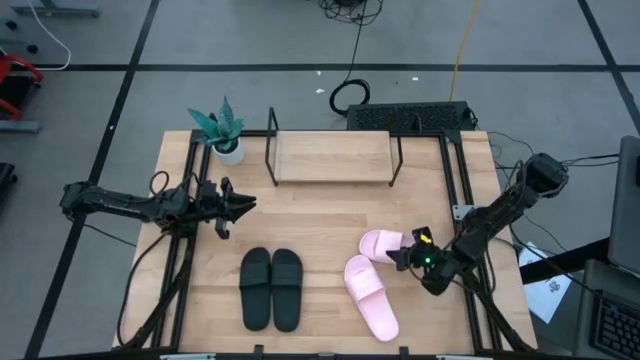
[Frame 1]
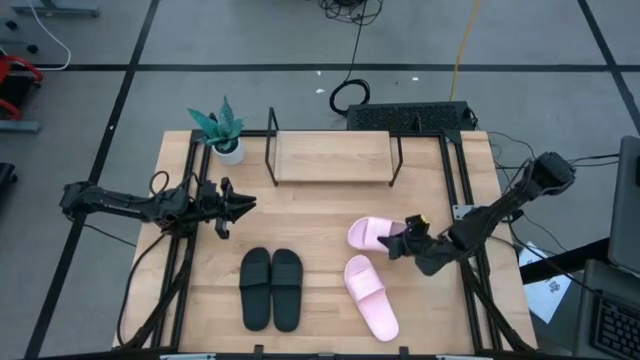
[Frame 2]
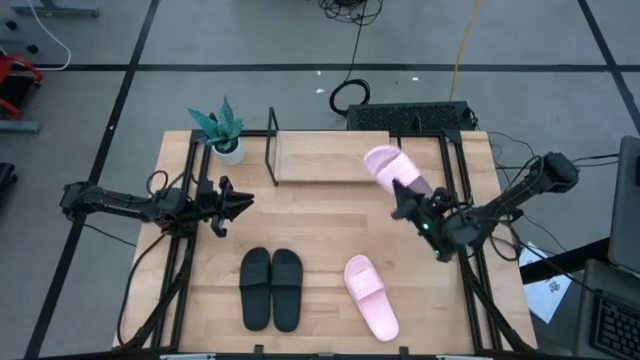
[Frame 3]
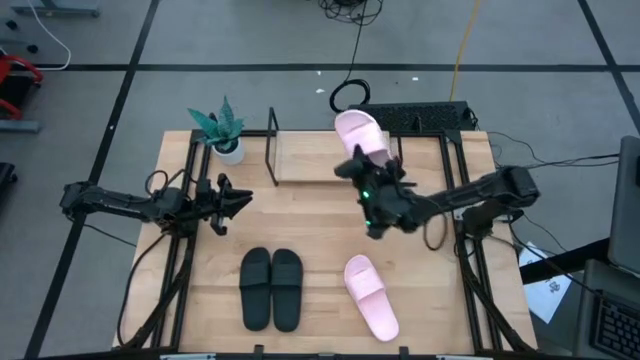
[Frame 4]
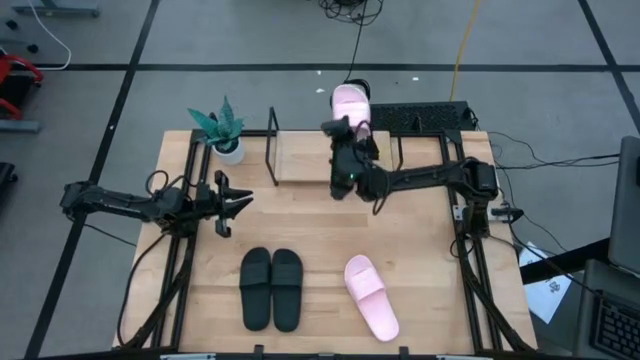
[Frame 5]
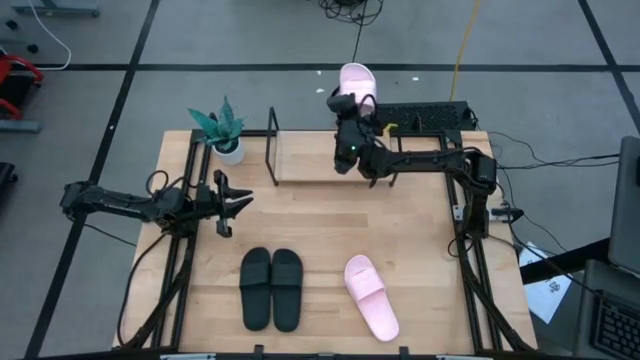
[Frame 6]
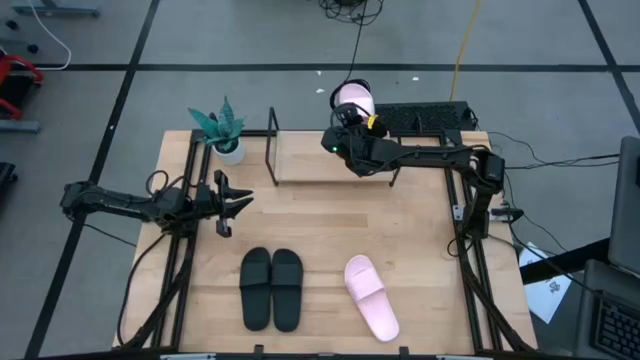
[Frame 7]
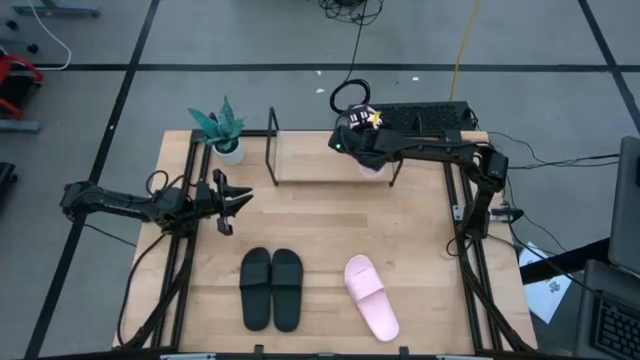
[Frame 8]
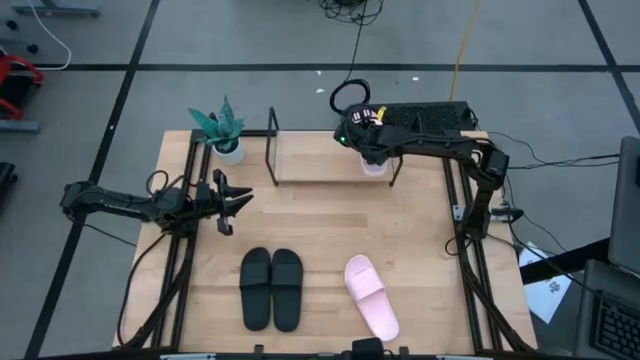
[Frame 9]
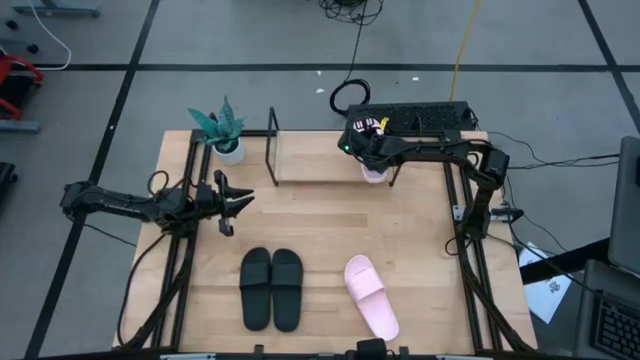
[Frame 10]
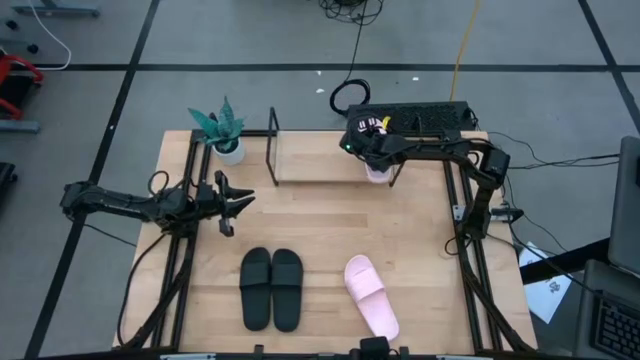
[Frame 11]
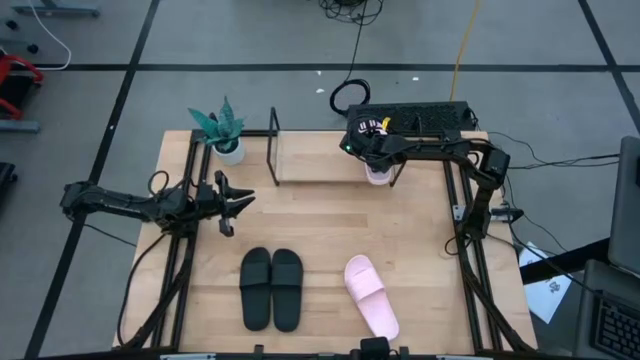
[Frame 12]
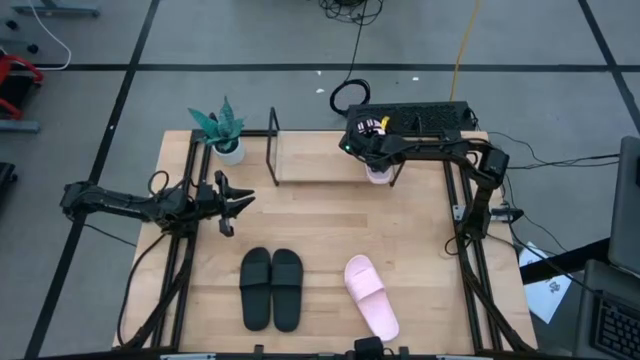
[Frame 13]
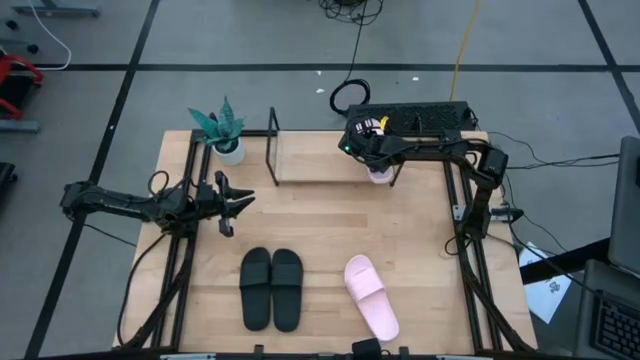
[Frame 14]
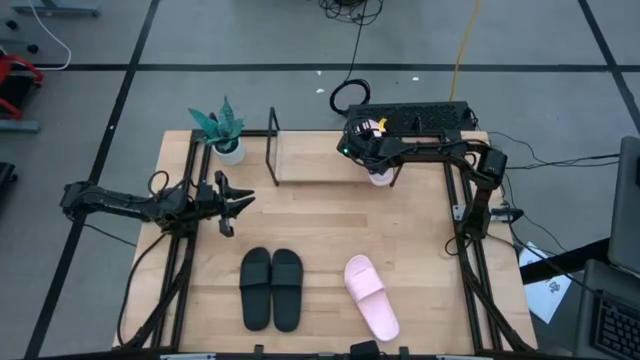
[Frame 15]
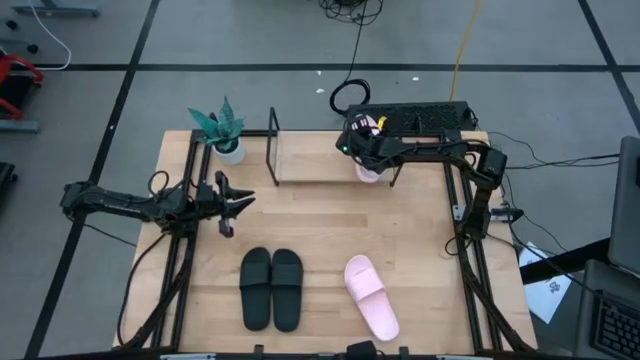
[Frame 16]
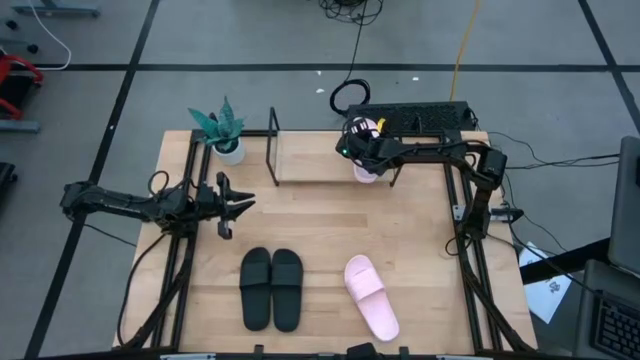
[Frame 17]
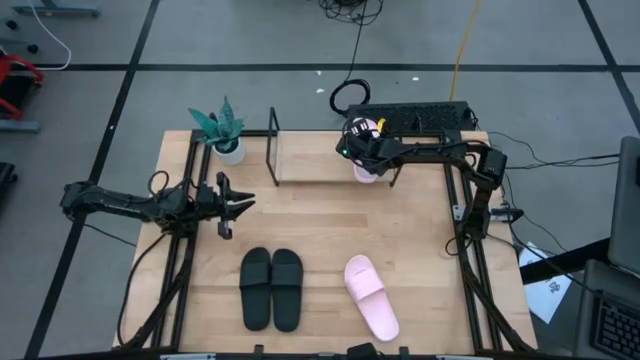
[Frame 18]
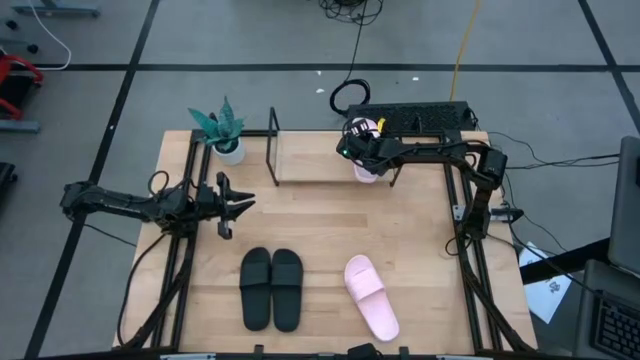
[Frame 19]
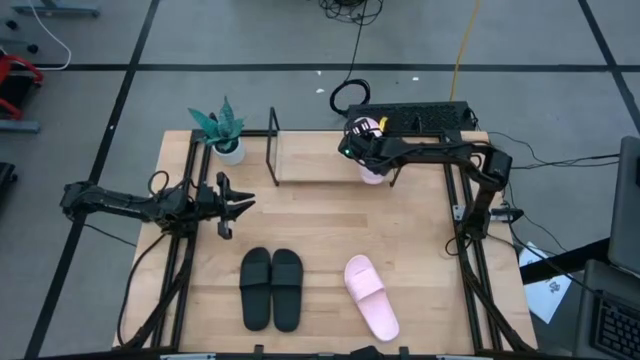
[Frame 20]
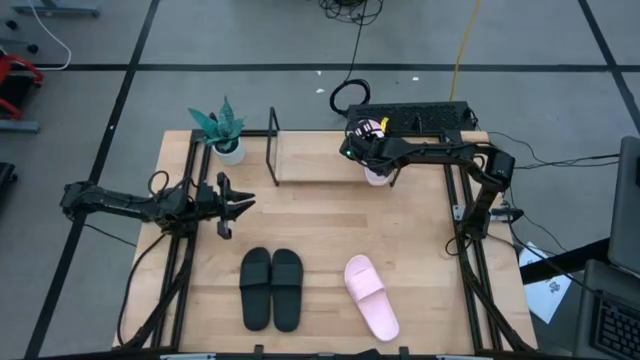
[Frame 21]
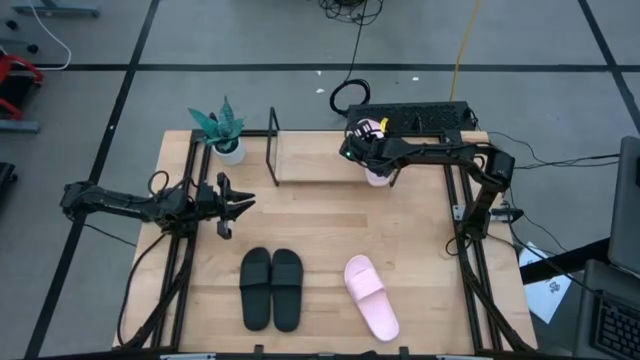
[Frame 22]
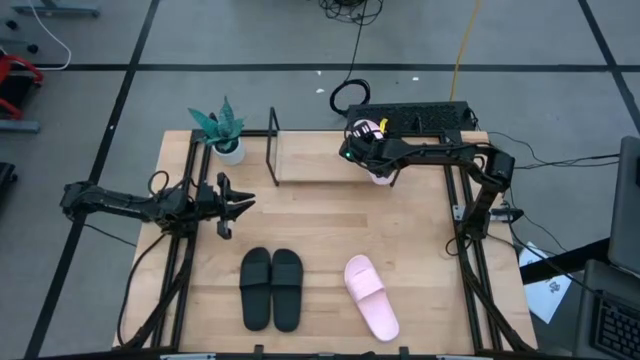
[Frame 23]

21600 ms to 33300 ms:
Task: Pick and place slides into the shelf
Put the right pink slipper on the shelf

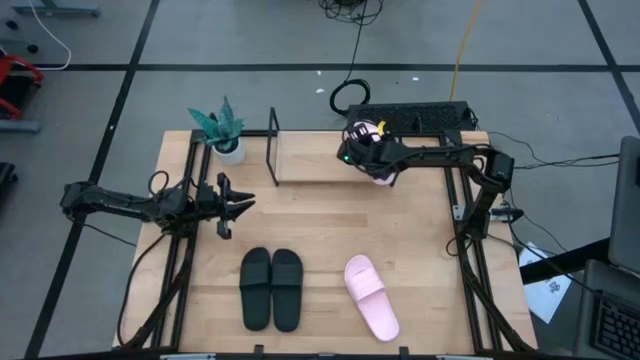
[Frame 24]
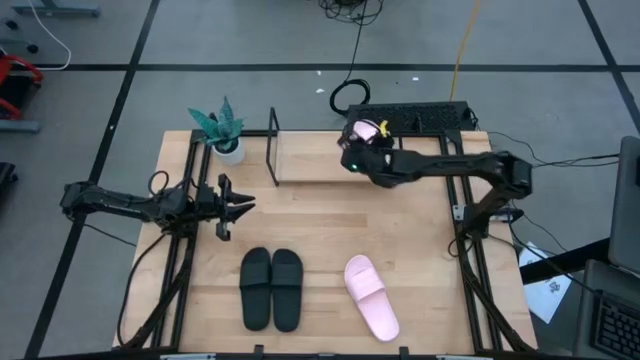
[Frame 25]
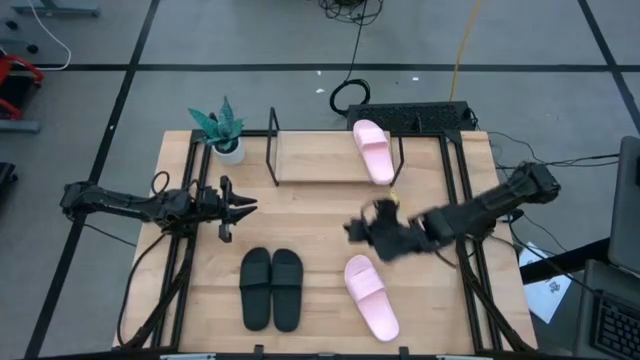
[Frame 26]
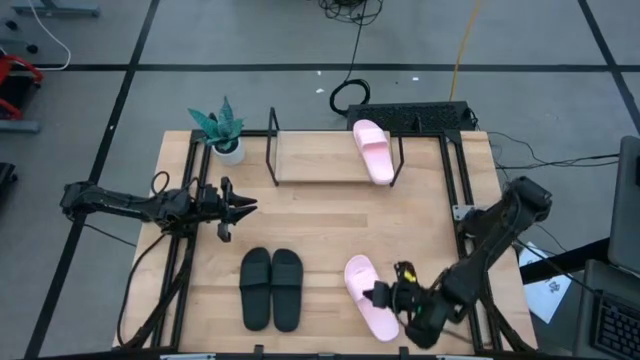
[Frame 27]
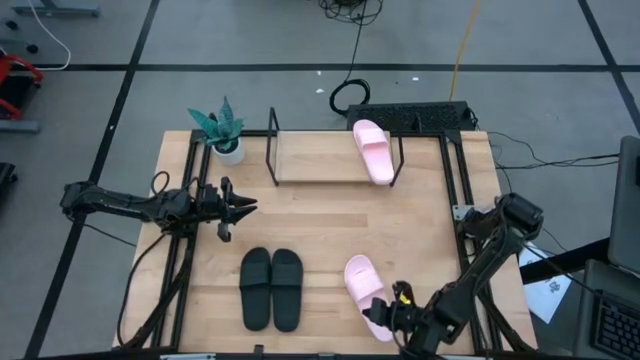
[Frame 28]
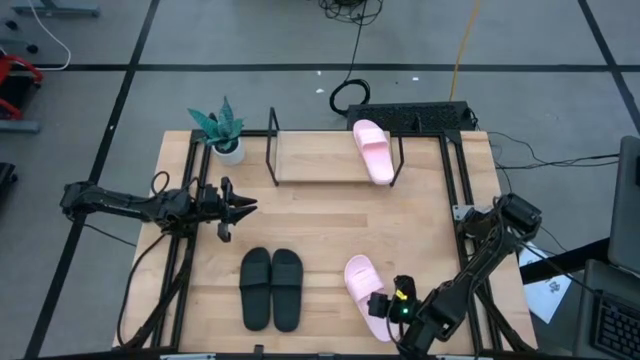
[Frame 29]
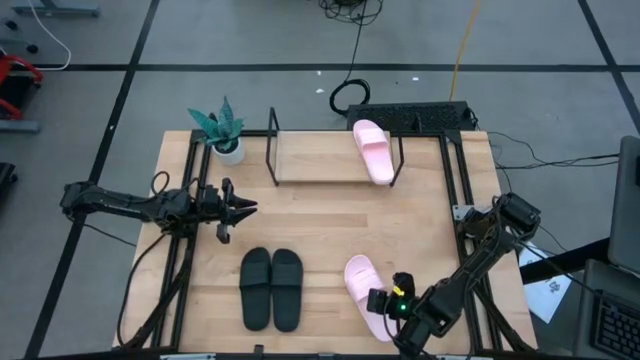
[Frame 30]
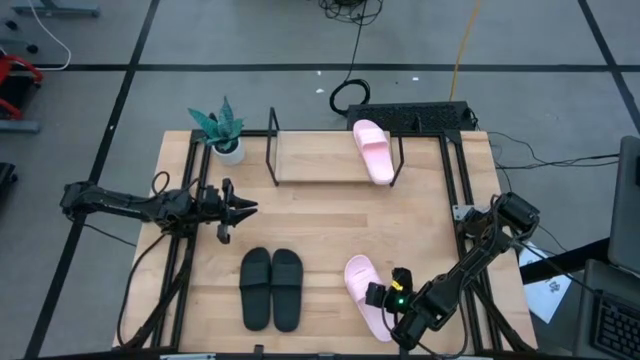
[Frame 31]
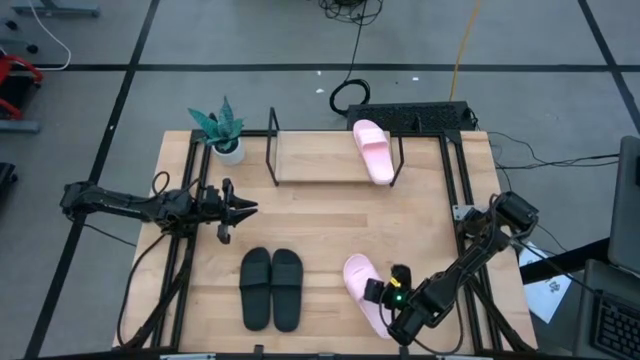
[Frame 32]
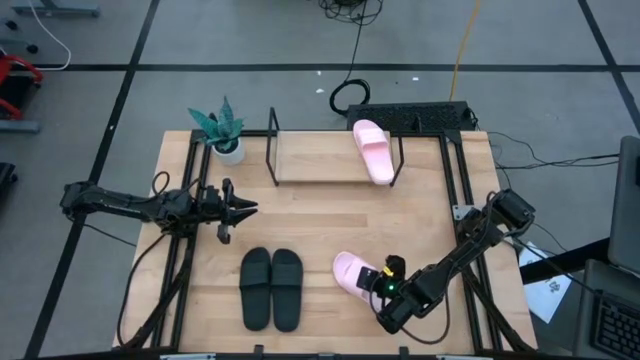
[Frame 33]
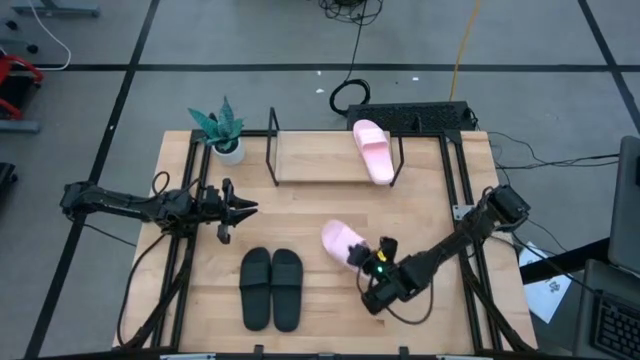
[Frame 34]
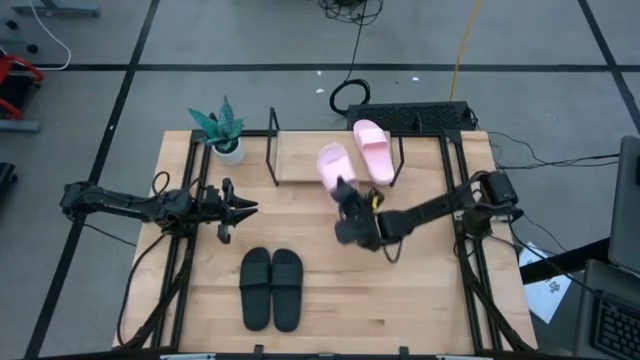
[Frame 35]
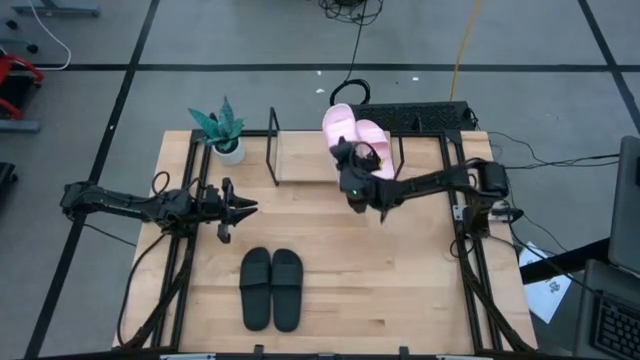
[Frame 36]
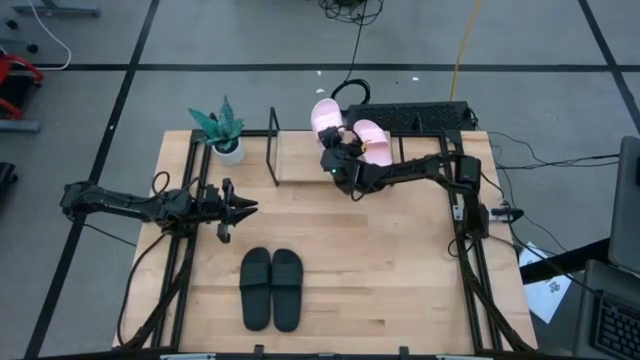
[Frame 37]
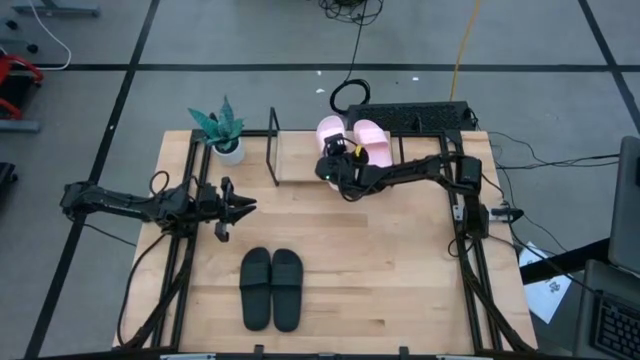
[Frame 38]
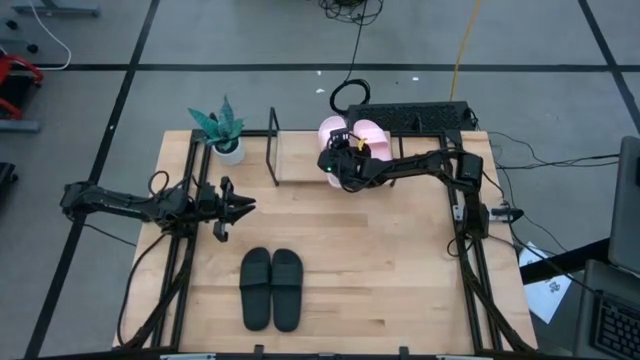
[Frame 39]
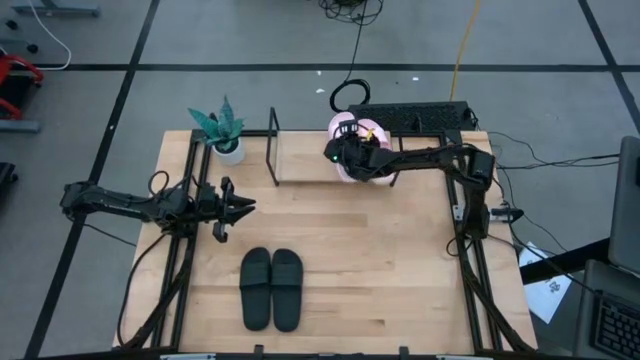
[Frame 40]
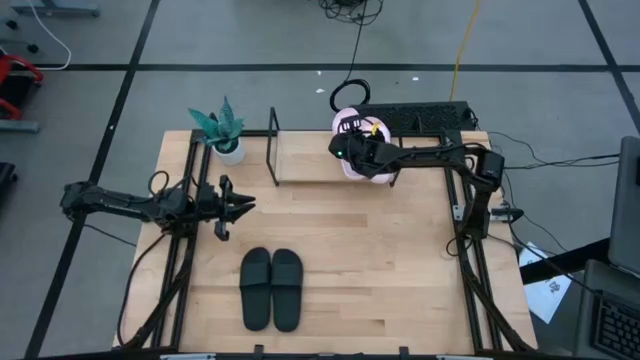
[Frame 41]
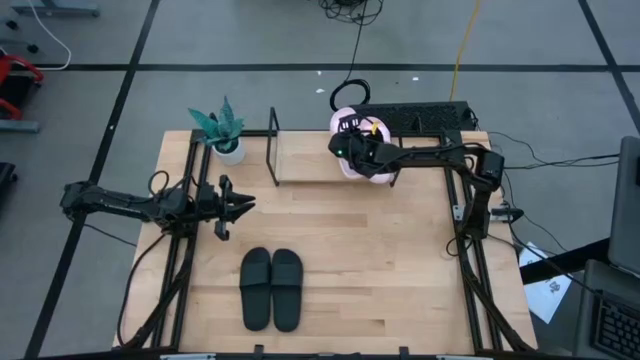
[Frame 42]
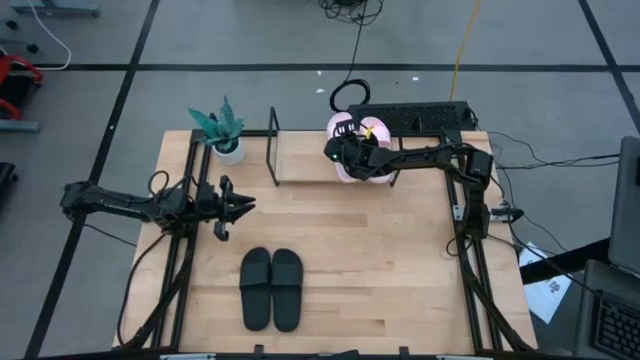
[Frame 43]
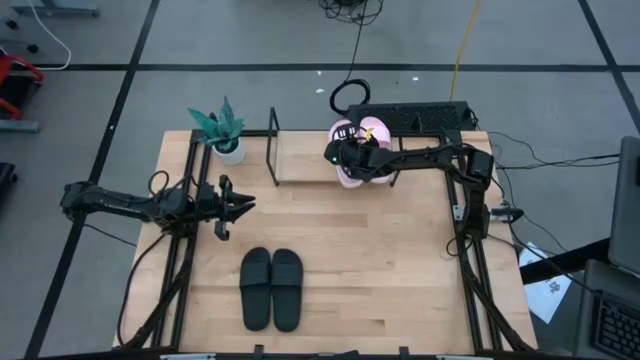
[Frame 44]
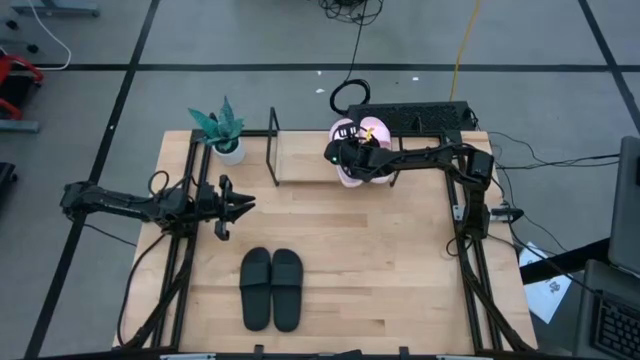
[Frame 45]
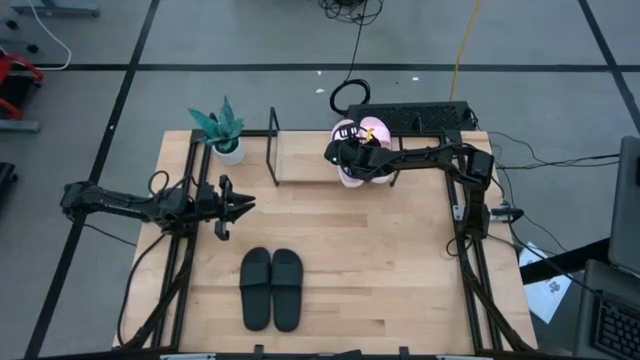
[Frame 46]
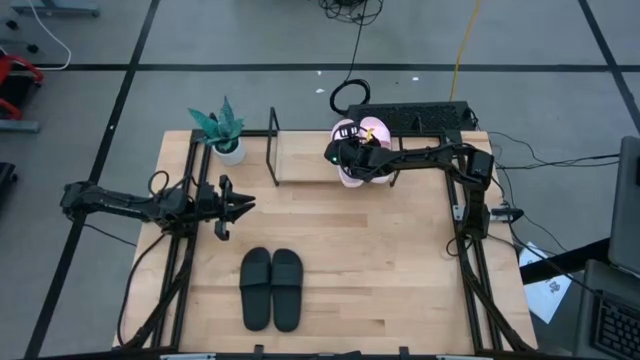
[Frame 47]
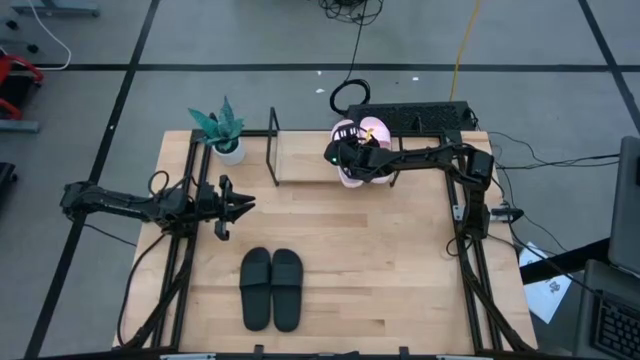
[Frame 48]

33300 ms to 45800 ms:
Put the pink slipper on the shelf
